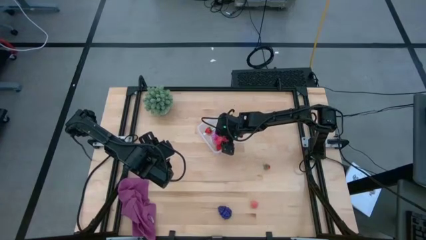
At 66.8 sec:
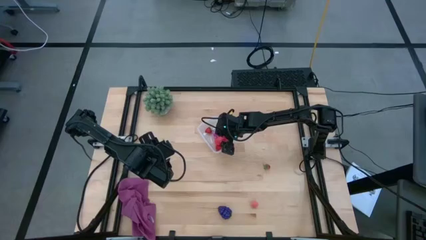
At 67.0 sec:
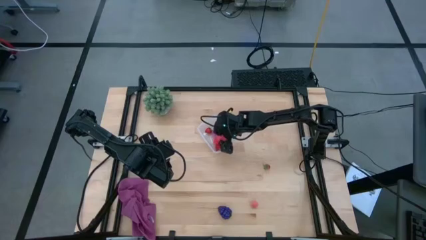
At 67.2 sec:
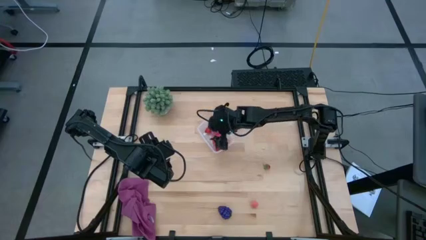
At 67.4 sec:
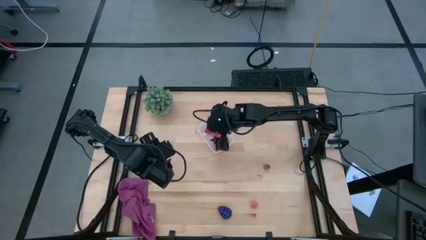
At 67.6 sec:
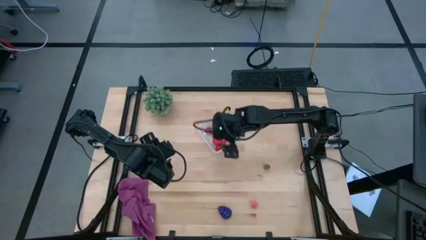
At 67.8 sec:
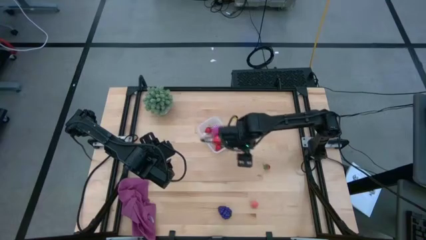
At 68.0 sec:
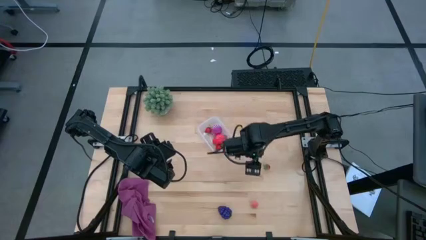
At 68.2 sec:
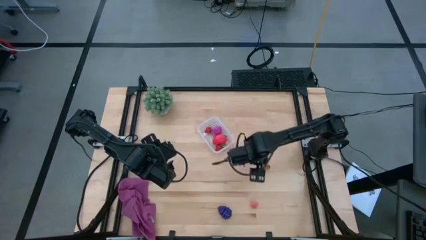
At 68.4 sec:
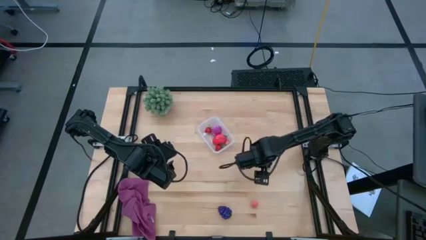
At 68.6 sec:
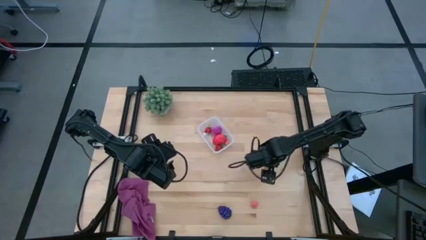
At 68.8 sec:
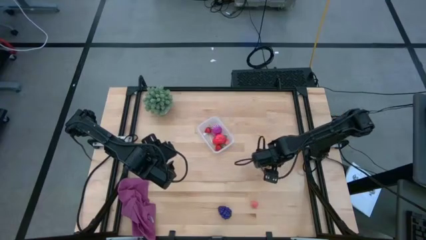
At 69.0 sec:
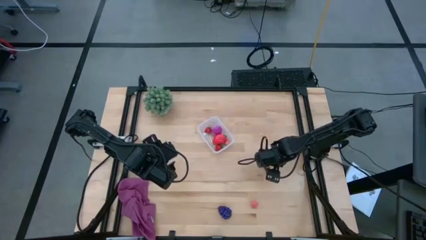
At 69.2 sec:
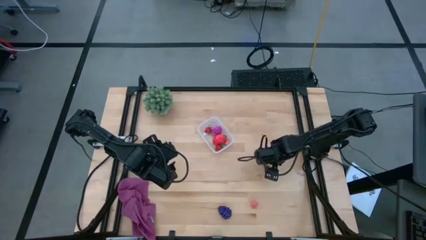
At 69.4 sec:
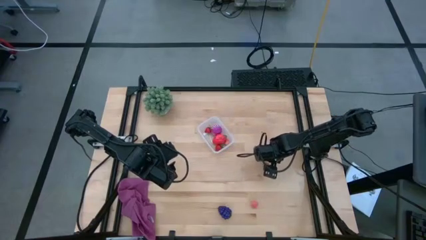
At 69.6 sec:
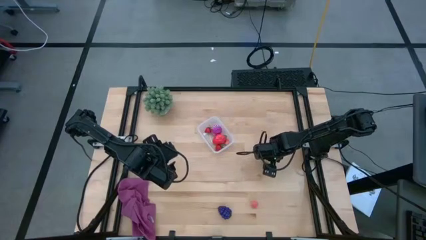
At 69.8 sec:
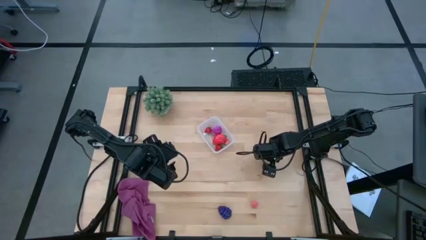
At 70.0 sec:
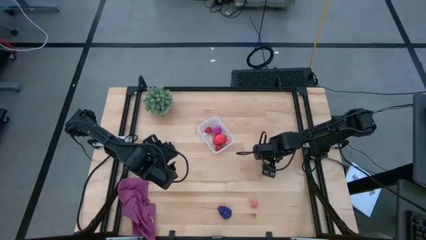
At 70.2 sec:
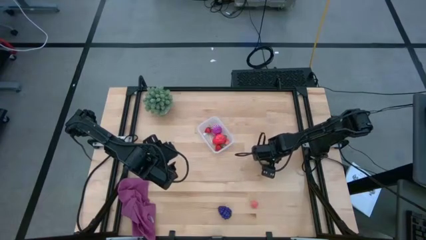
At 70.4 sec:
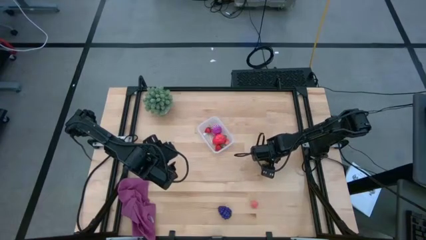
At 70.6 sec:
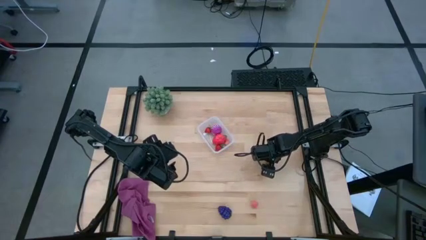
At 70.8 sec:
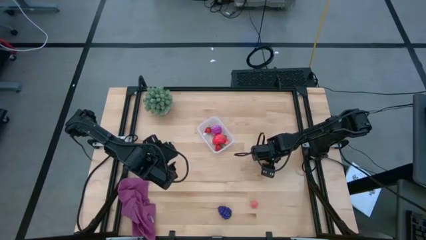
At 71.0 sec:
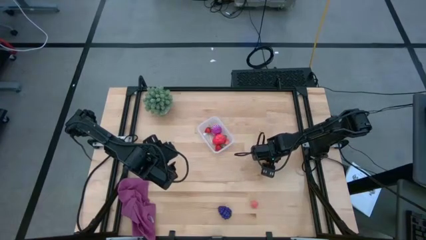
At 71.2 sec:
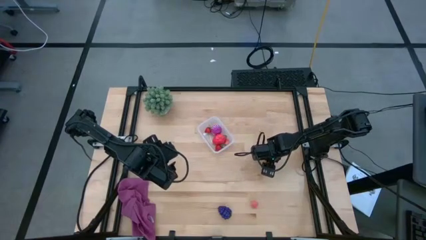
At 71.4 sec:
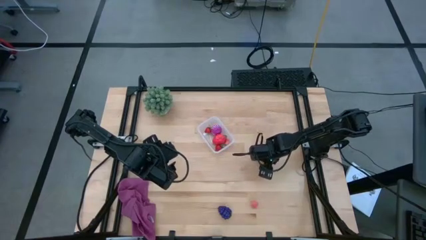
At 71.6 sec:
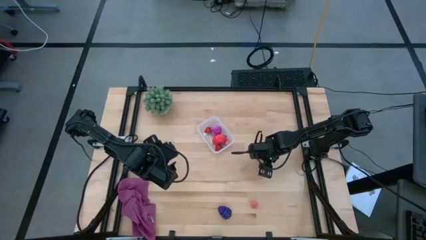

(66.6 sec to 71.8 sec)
Task: Pick and placing Produce into tupperware
Put the strawberry into the transparent bin

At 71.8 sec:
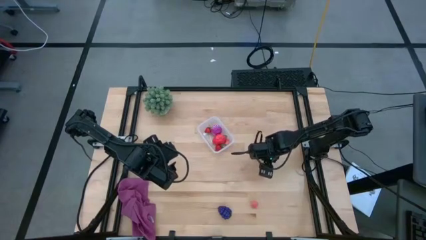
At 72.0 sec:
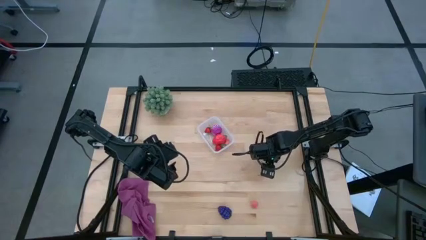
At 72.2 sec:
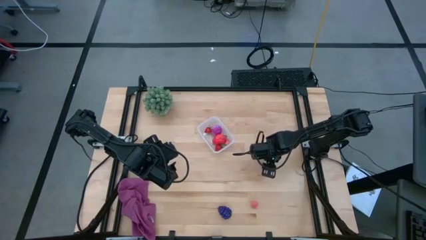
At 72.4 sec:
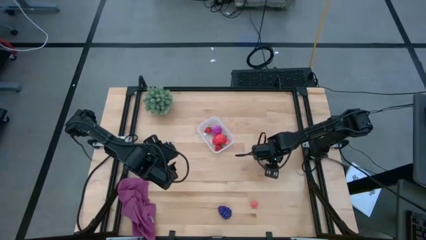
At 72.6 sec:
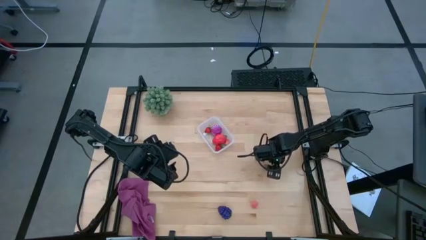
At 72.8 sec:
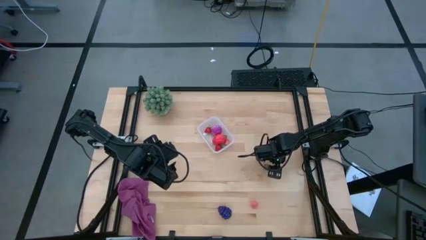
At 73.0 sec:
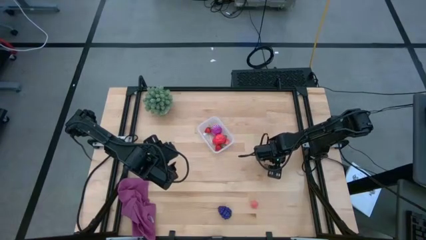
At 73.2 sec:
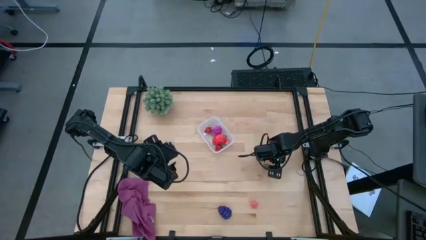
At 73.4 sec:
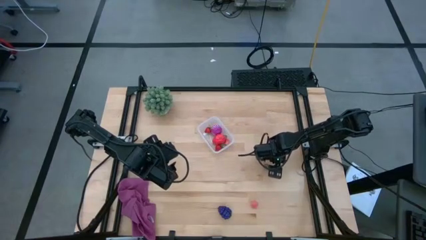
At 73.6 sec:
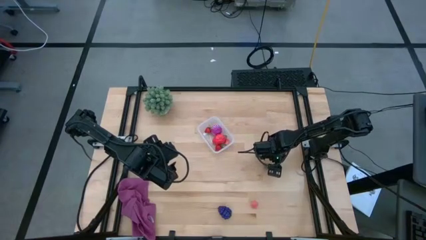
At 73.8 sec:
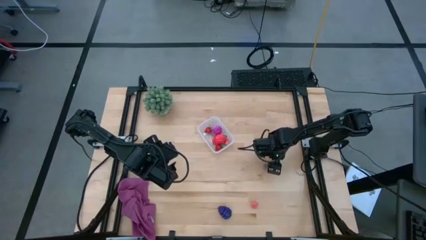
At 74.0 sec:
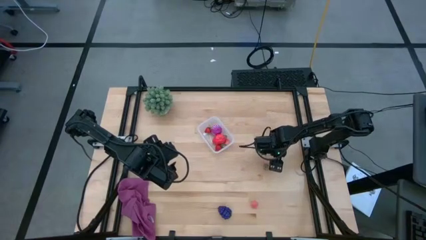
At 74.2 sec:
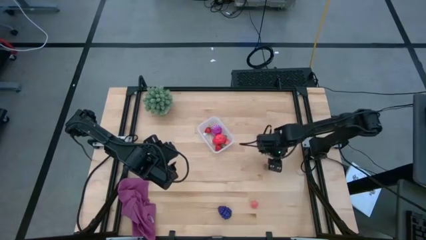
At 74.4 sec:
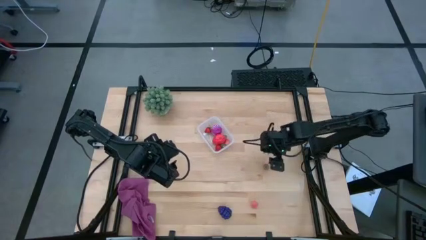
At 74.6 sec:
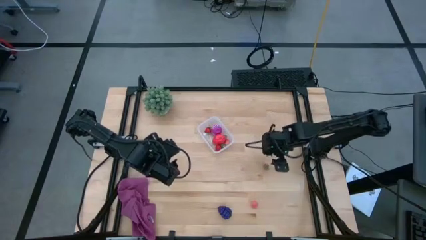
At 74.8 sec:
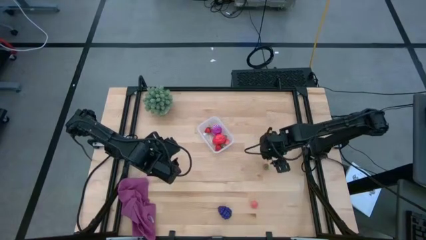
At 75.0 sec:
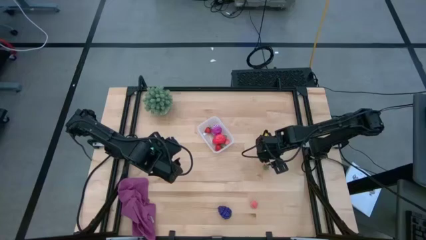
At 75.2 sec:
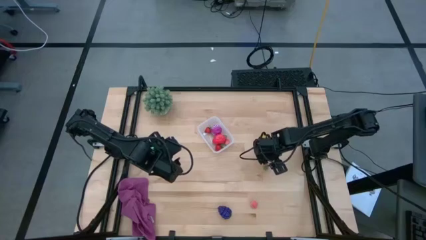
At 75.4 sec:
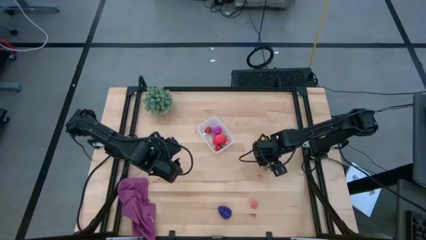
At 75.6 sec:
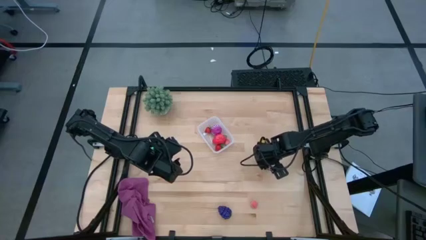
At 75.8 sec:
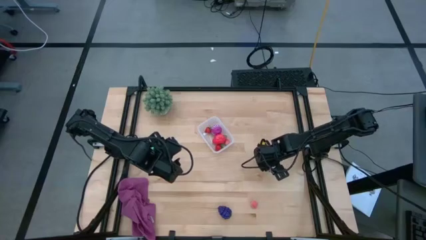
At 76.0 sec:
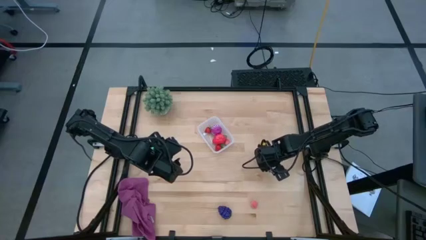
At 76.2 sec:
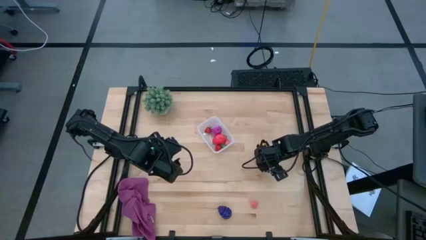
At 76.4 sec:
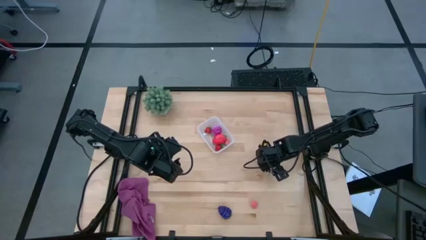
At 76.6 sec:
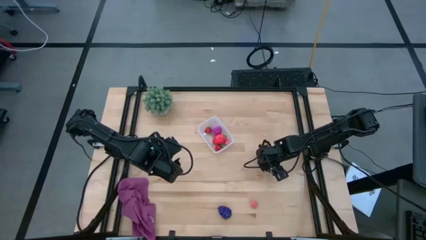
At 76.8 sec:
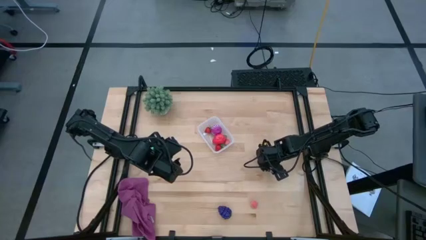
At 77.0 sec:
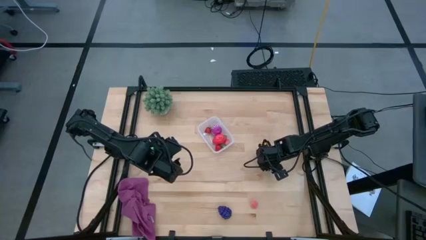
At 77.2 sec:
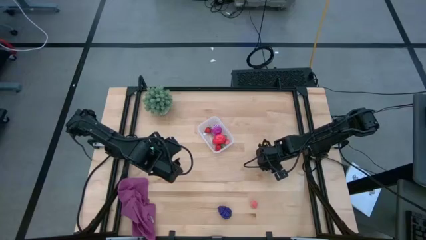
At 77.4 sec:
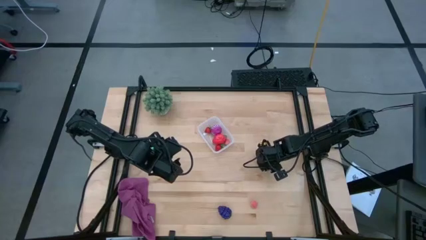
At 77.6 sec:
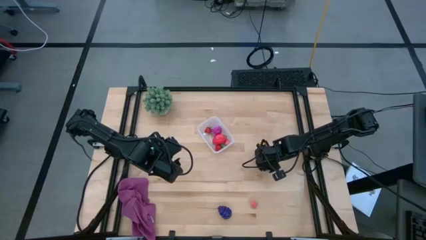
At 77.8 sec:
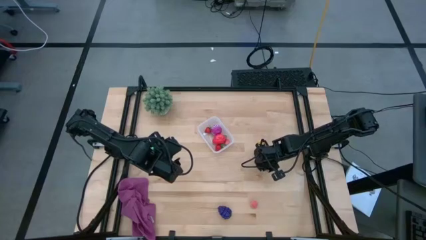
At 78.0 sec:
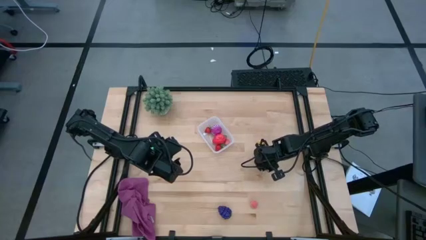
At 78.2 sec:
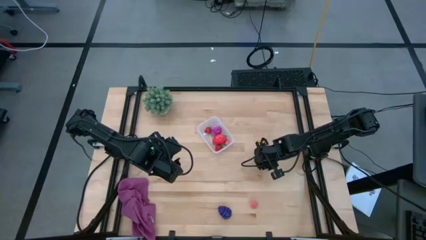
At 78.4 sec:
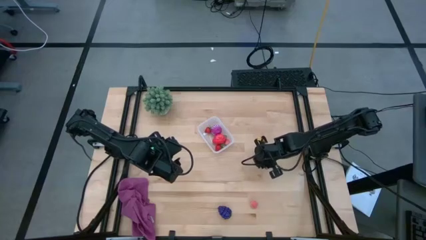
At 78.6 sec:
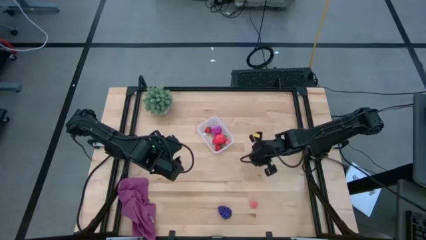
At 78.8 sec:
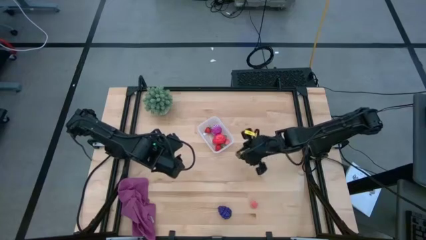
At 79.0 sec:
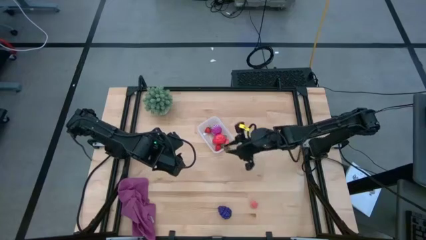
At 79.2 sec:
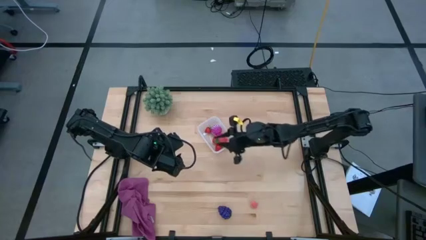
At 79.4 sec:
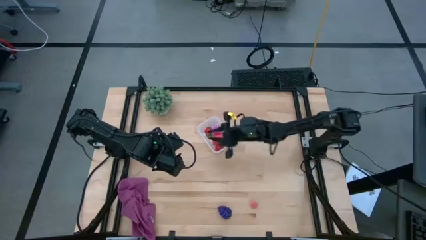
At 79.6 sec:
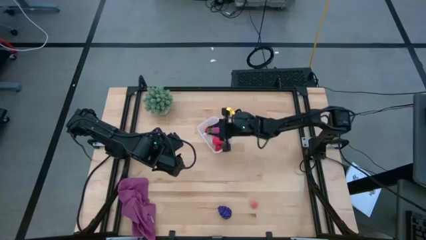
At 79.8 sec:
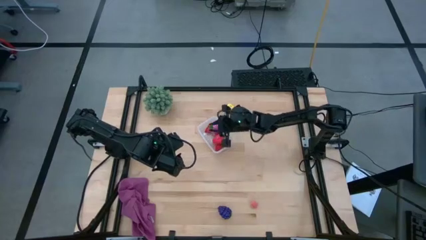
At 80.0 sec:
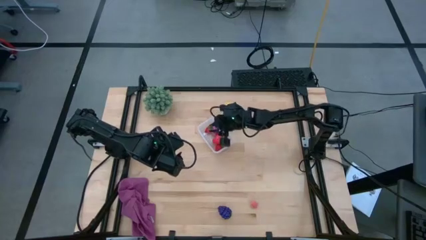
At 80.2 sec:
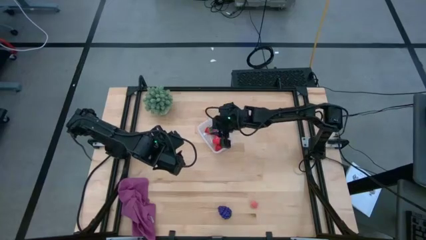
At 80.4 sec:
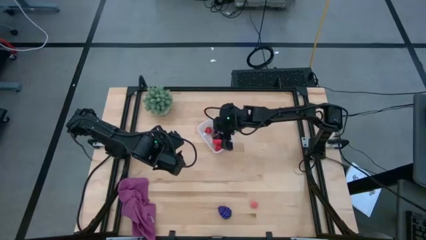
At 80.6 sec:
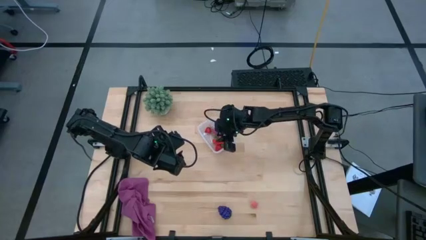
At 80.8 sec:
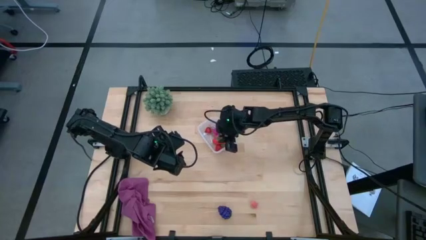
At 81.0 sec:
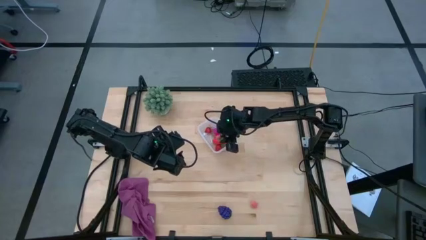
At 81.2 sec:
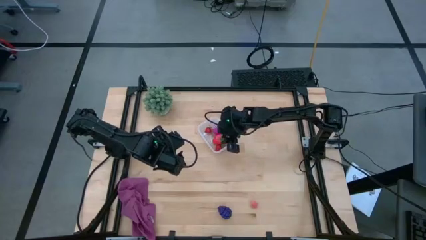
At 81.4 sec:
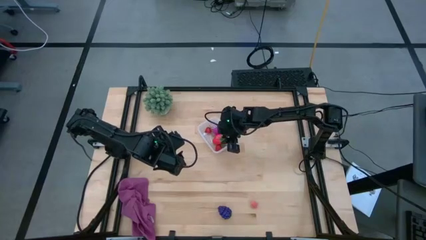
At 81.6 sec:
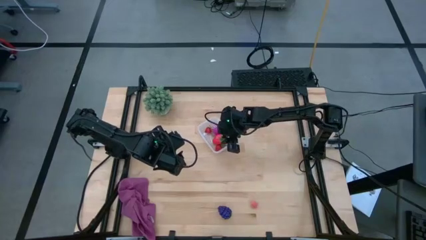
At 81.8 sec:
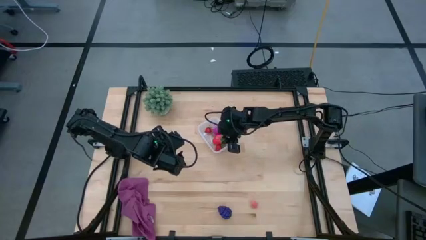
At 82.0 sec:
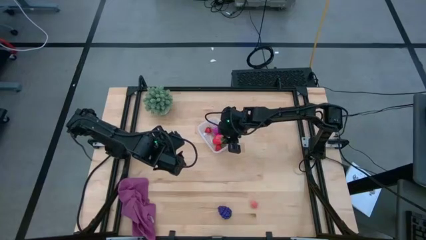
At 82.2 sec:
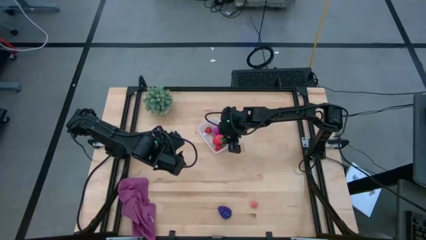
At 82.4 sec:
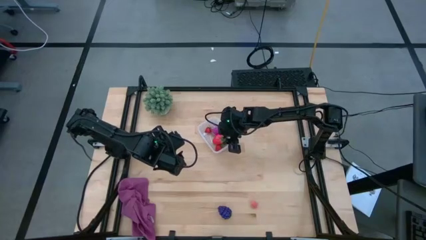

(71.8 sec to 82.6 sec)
Put the strawberry into the transparent bin
